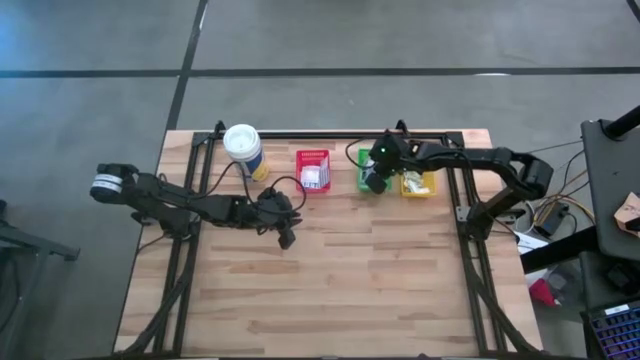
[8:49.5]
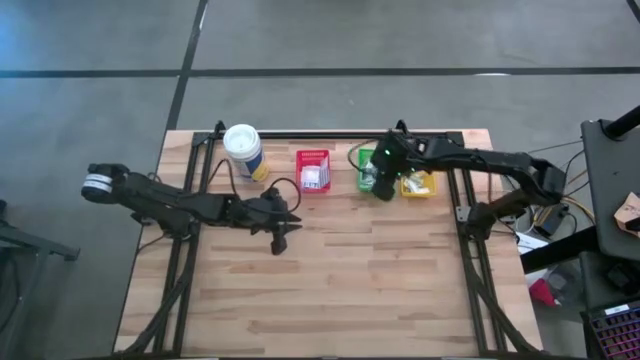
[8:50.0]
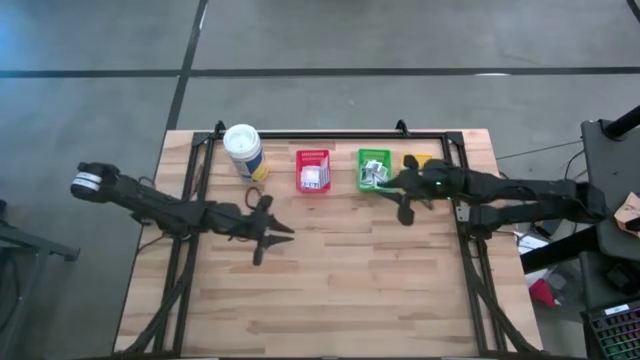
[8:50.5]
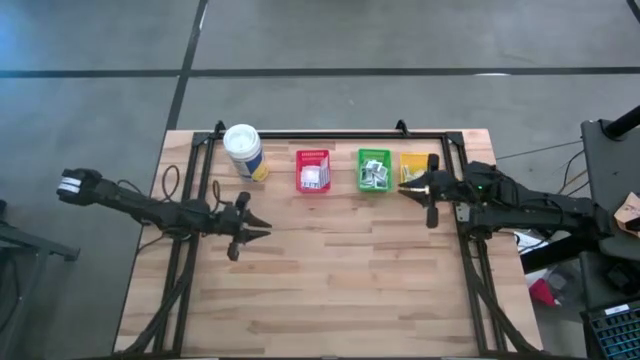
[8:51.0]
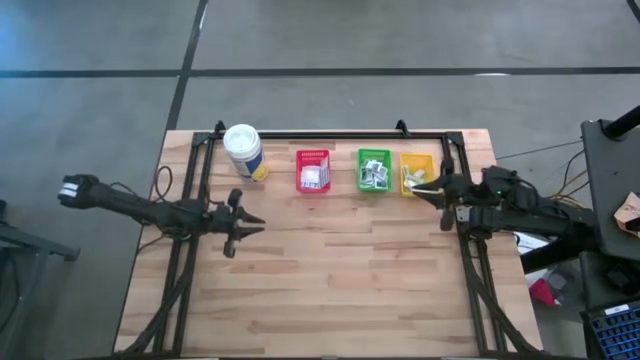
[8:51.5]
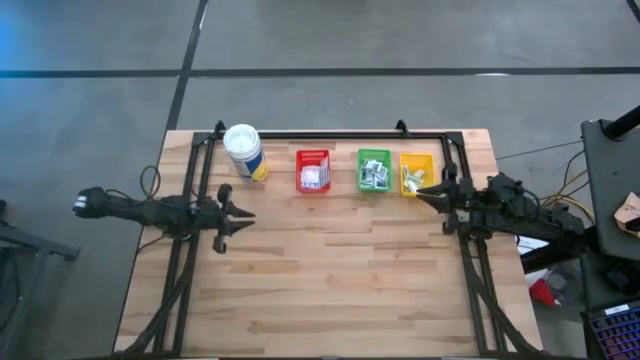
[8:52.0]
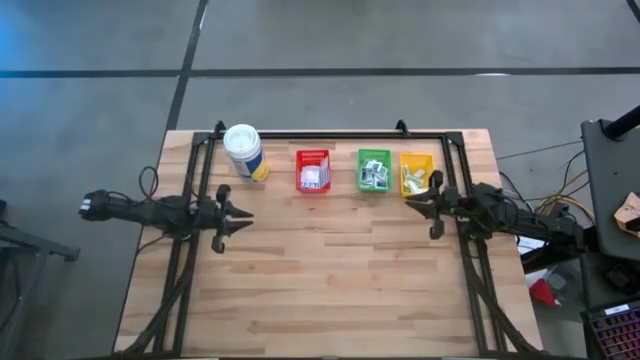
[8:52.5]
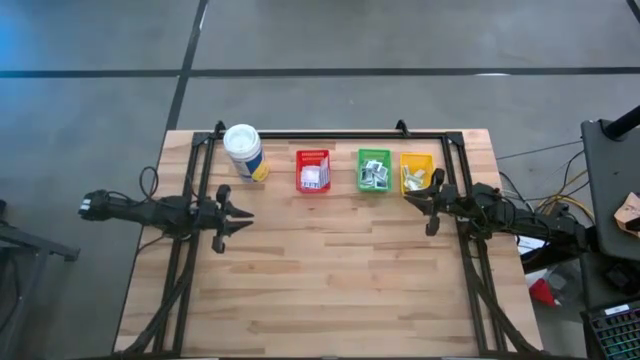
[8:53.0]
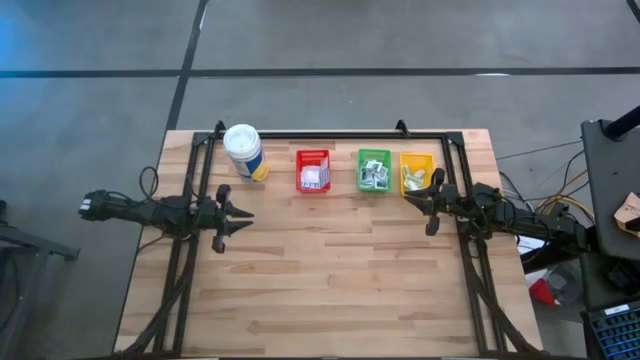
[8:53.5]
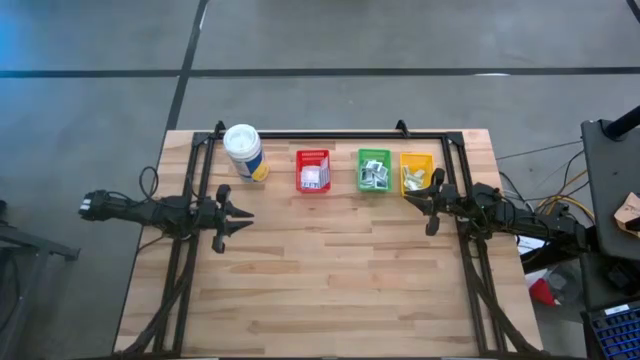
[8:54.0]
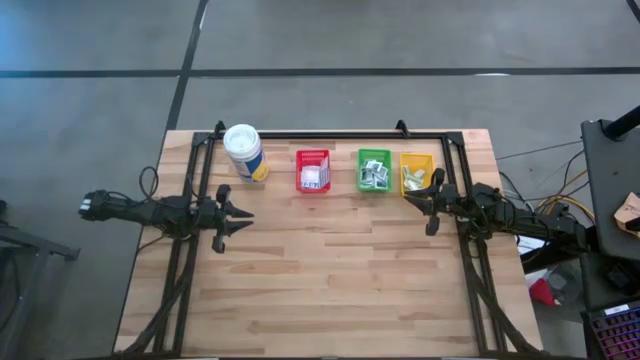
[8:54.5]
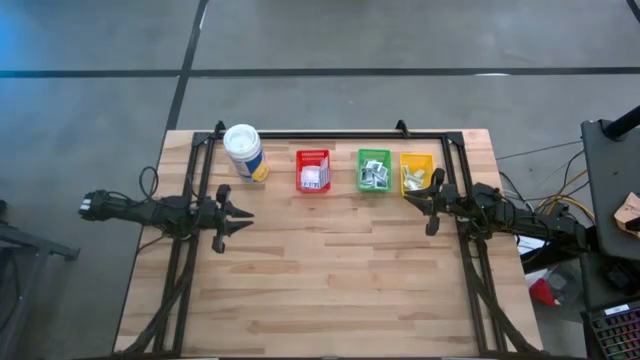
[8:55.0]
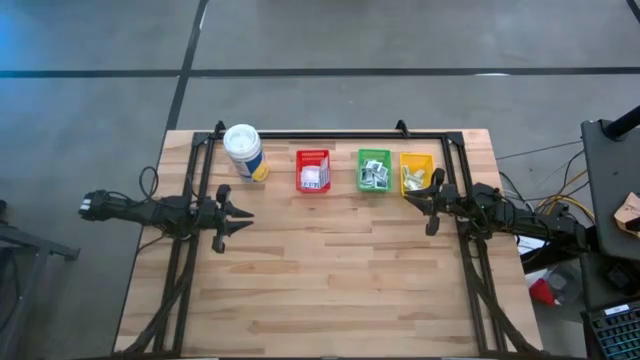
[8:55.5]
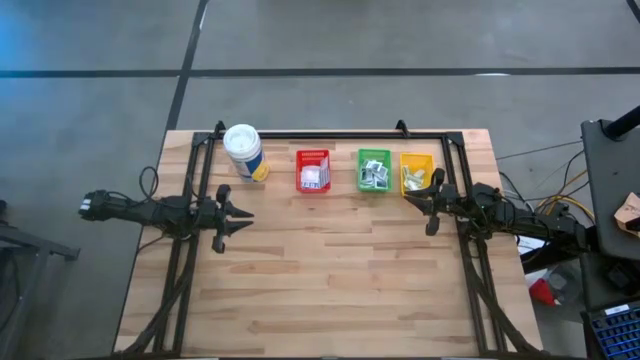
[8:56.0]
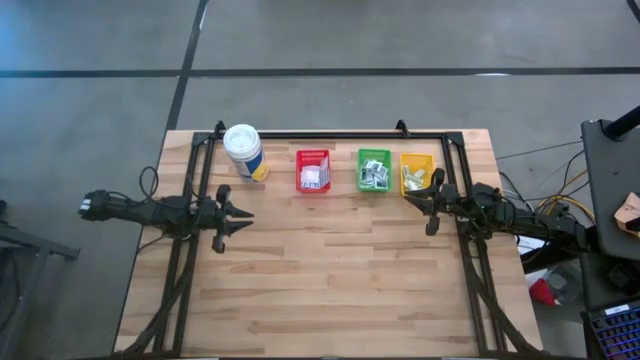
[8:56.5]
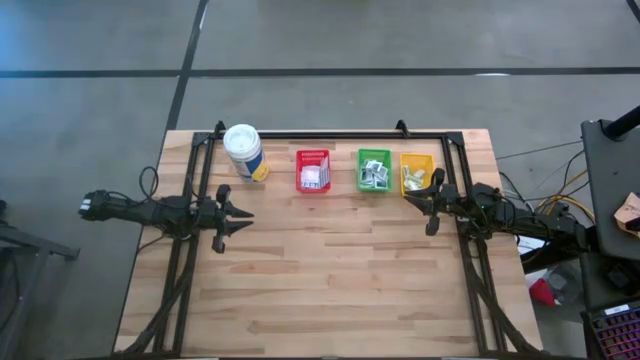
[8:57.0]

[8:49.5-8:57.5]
Task: Pick & Place First Aid Supplies
Return to home position

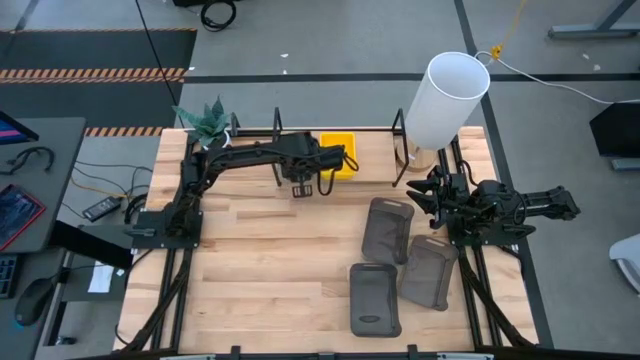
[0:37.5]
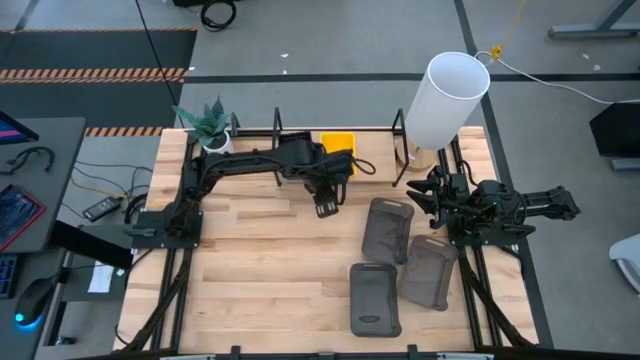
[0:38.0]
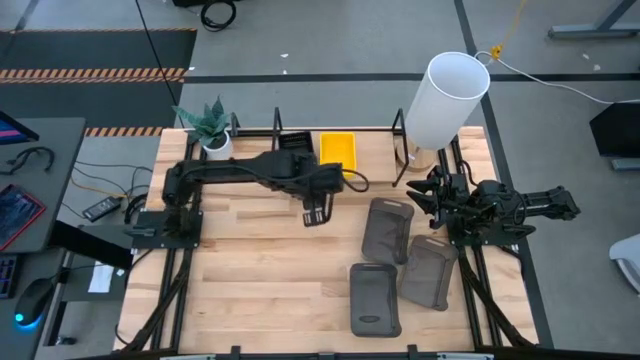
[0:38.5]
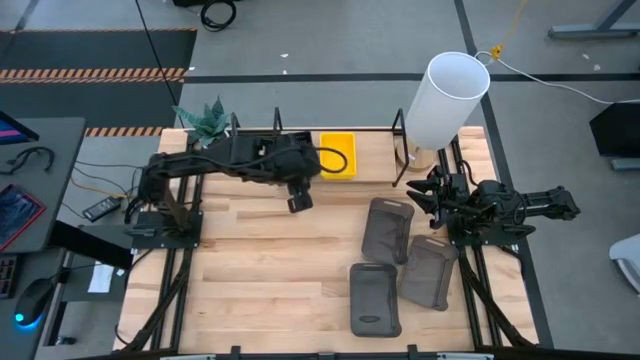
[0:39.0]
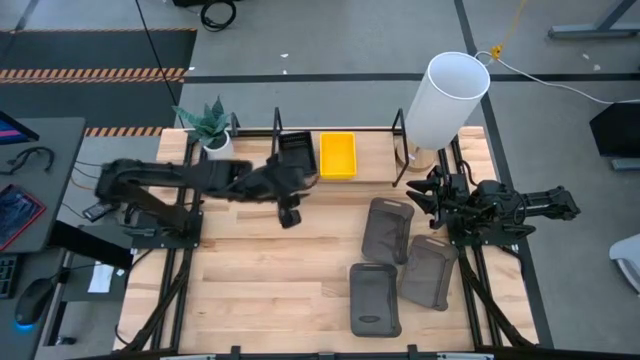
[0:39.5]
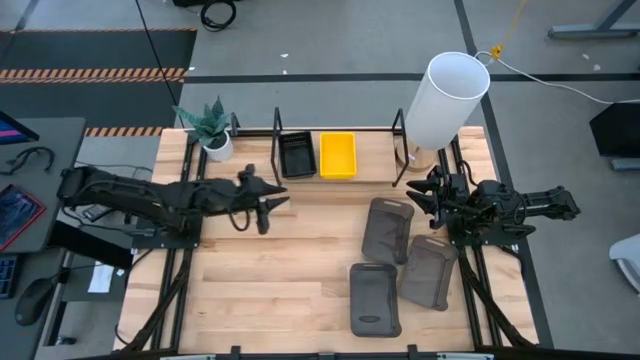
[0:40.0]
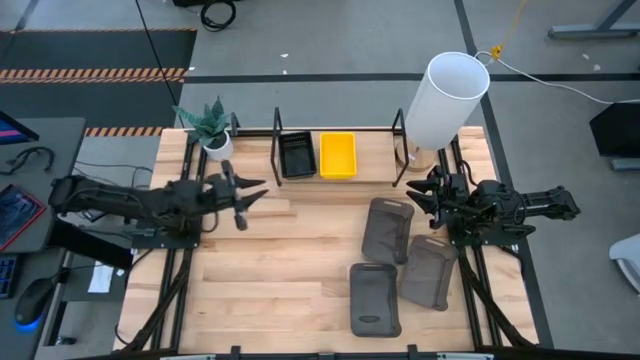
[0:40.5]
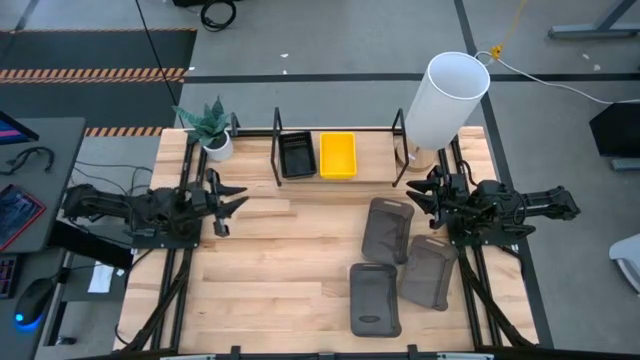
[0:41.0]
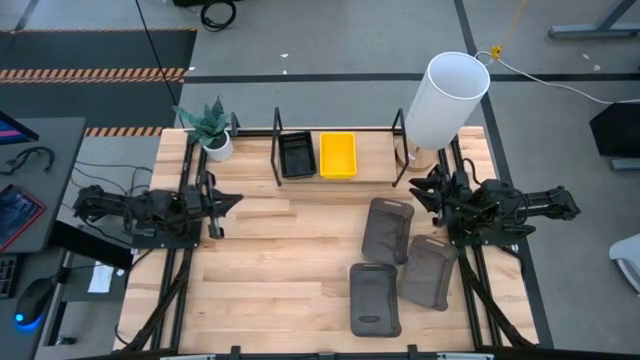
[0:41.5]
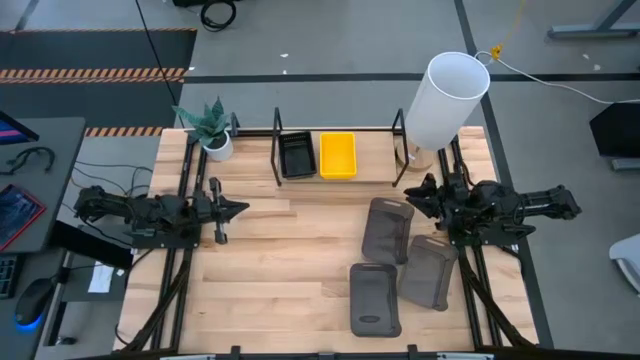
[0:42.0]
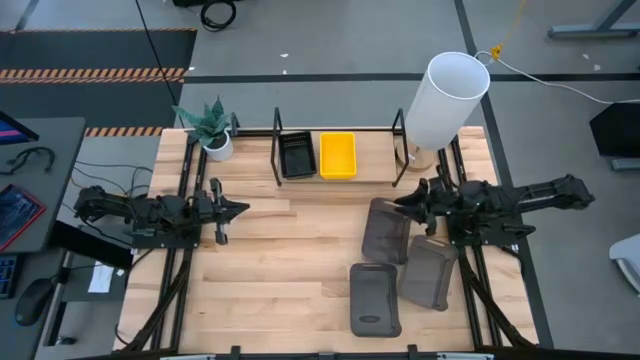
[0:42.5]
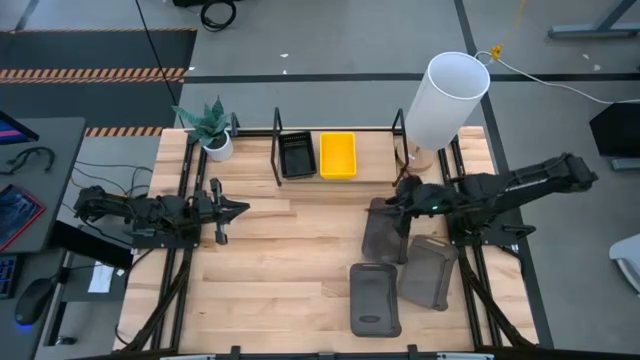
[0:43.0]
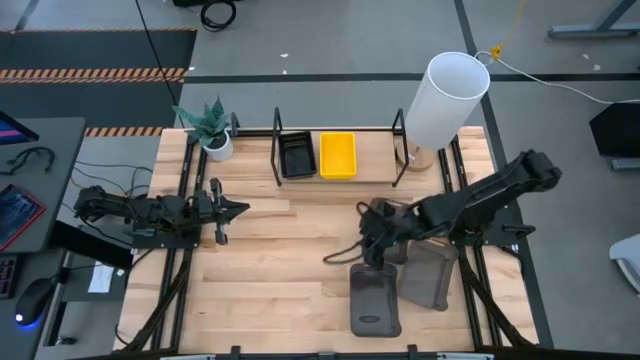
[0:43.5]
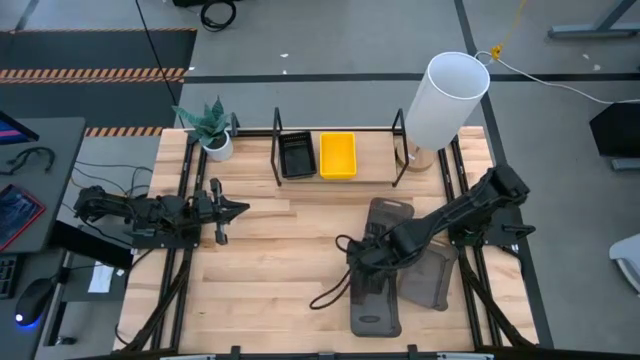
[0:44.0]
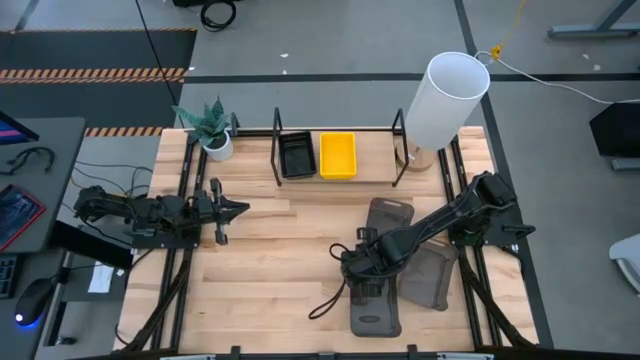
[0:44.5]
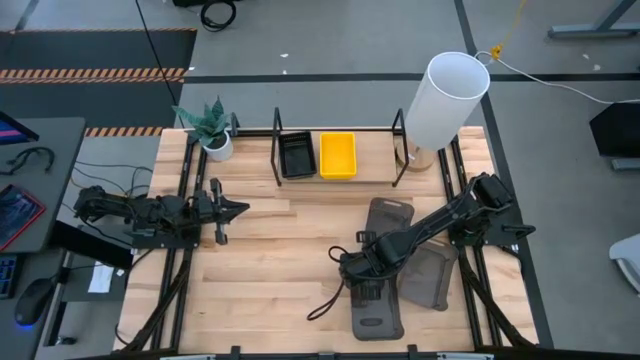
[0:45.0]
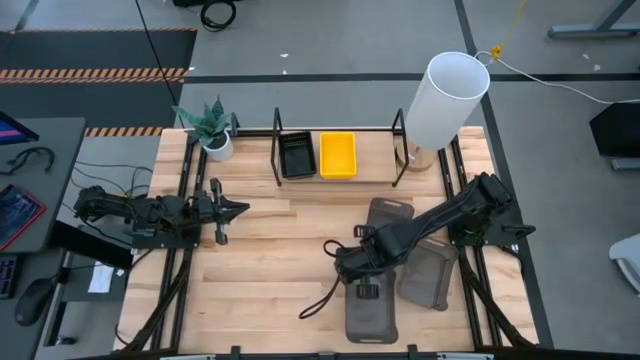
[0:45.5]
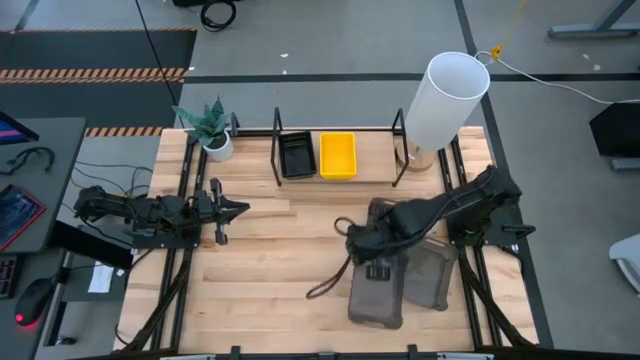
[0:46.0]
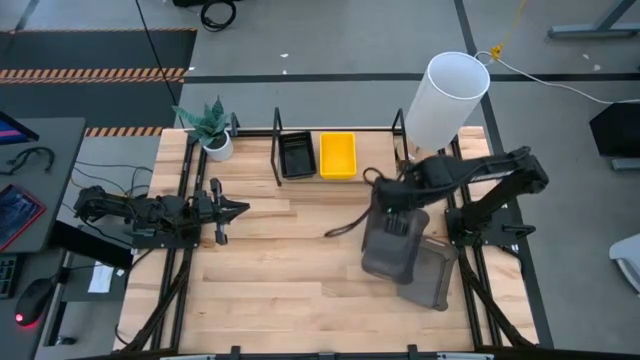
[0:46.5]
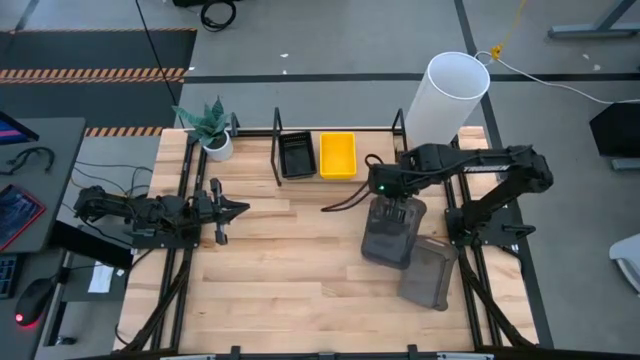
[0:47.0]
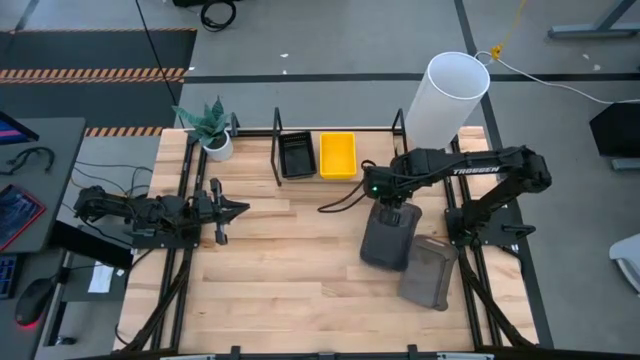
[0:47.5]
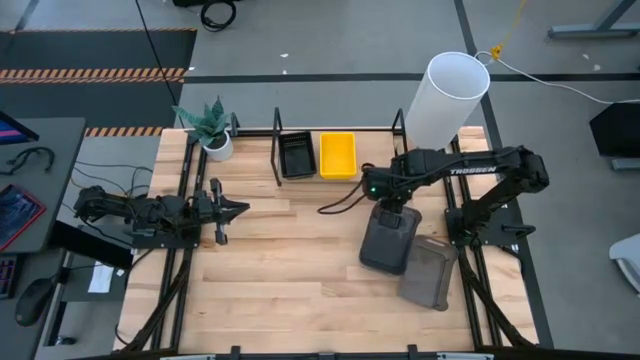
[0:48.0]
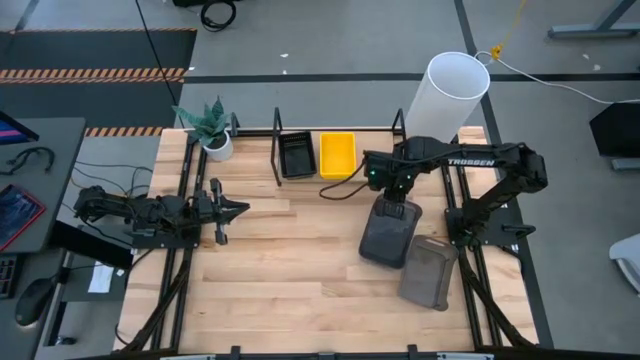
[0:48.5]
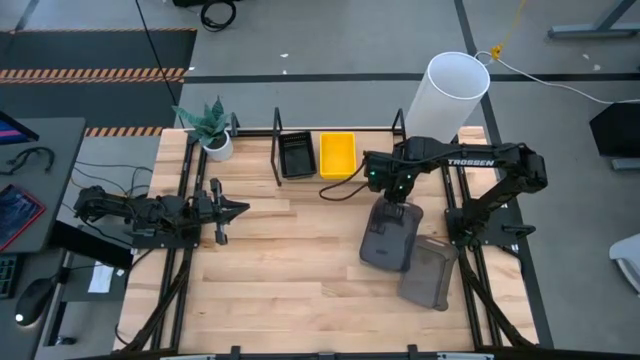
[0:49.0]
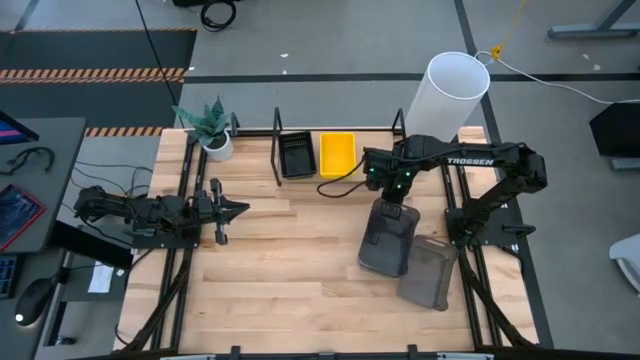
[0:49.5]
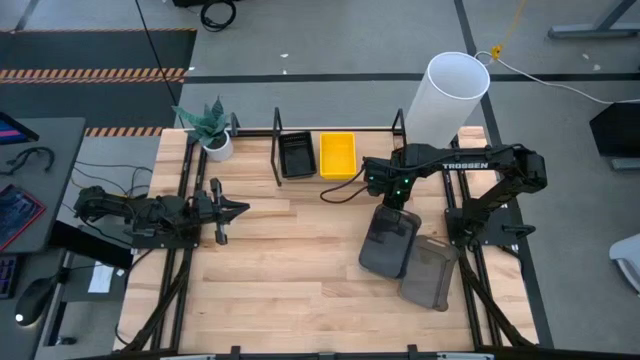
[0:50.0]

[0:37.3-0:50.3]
Task: Stack baskets on shelf by color
Stack the bottom black transparent bin on top of the black transparent bin
